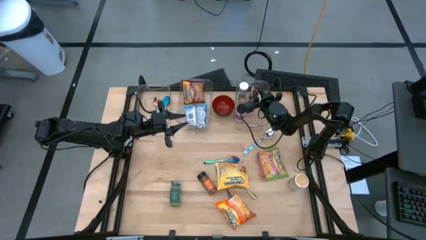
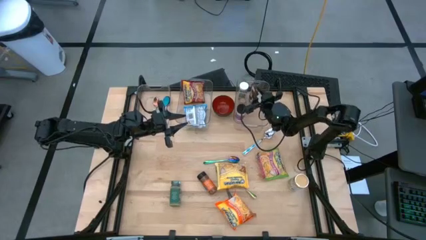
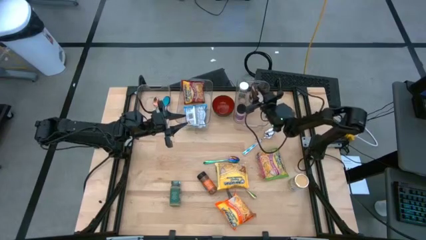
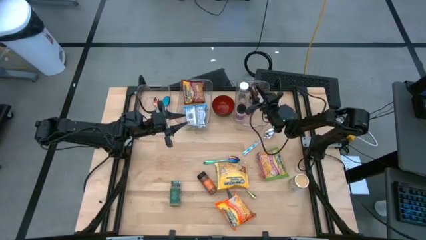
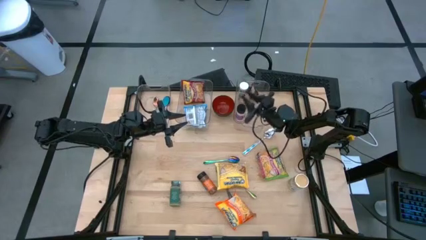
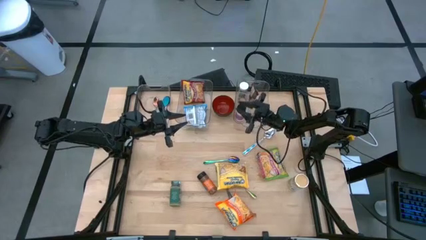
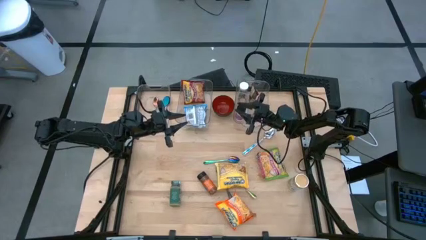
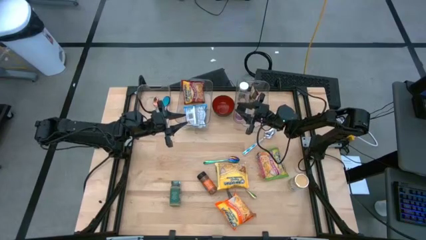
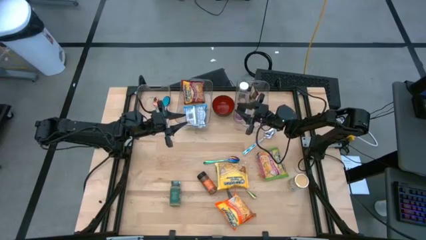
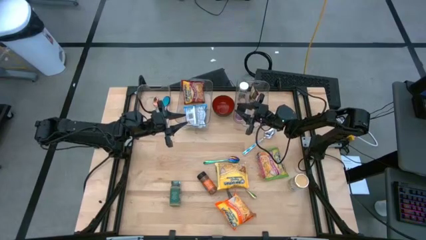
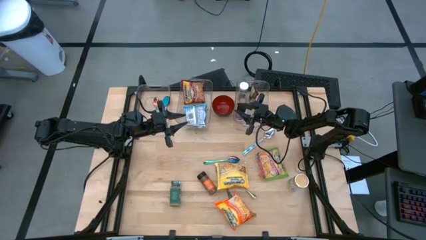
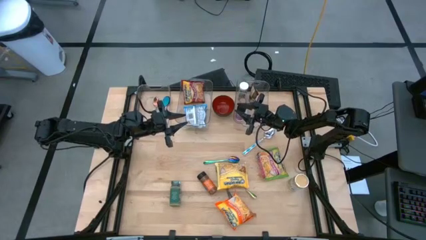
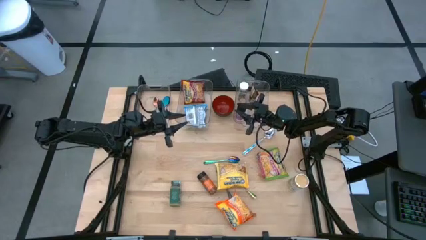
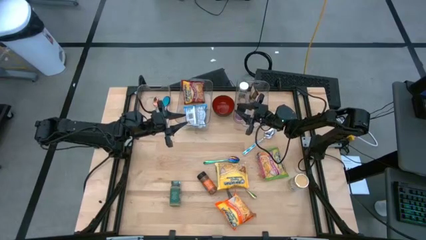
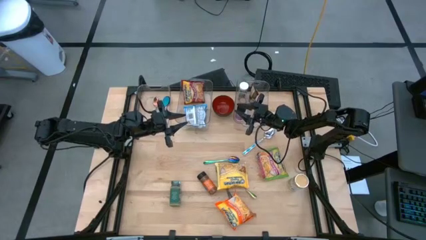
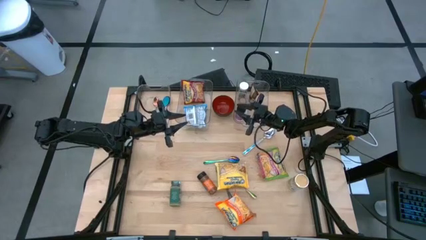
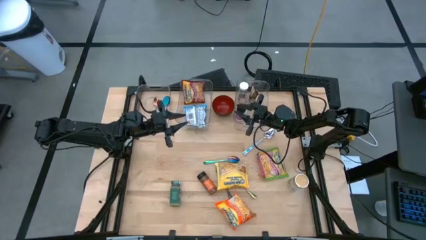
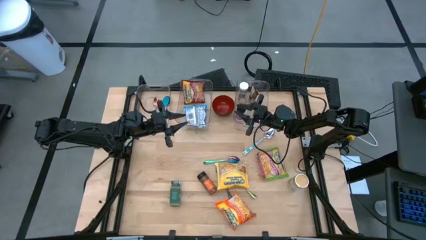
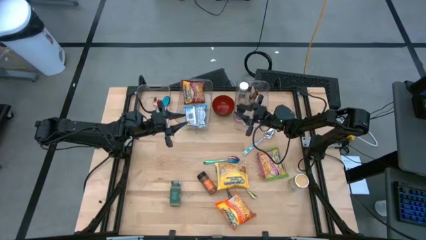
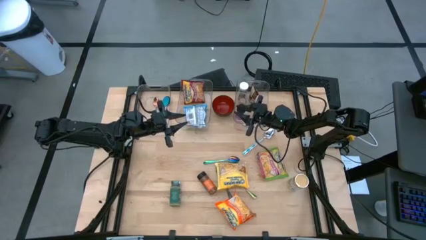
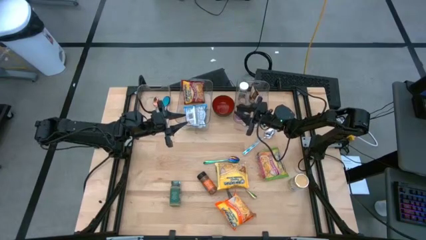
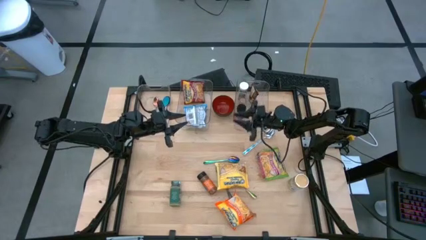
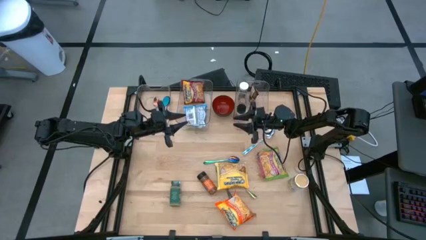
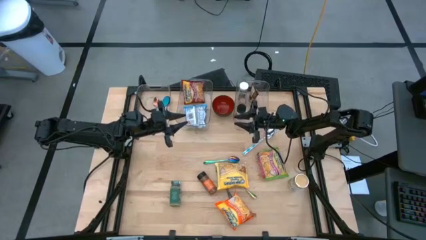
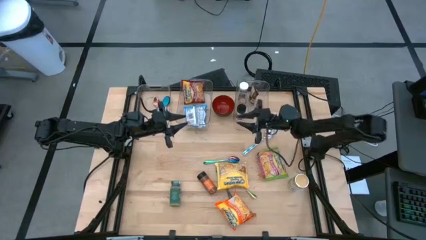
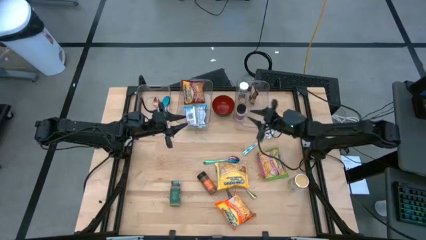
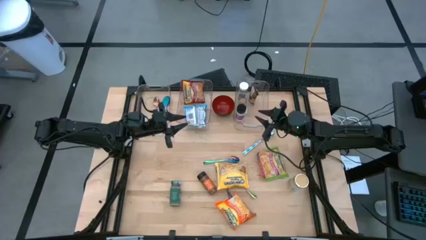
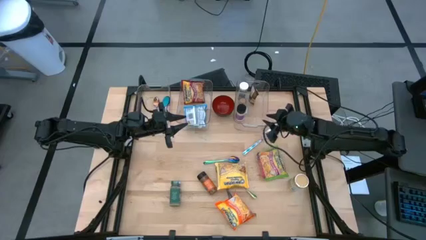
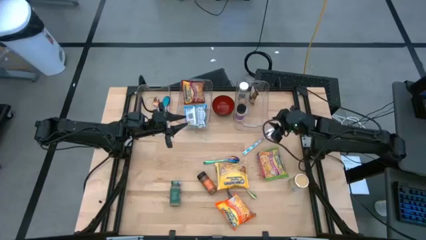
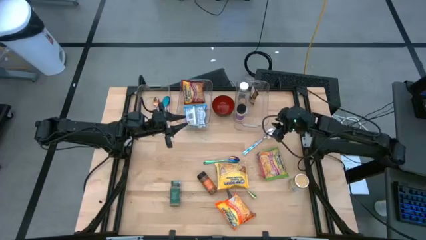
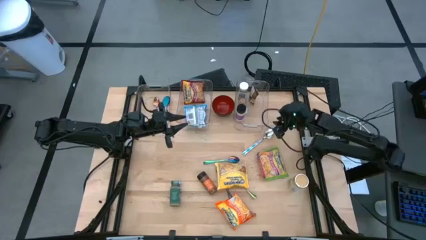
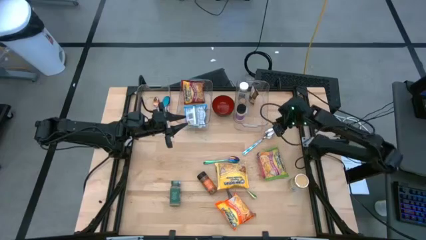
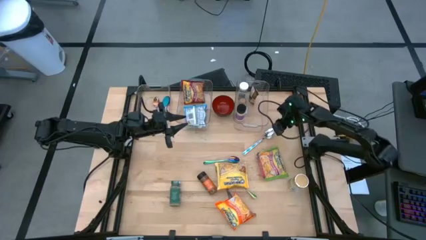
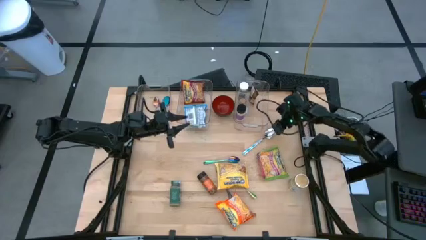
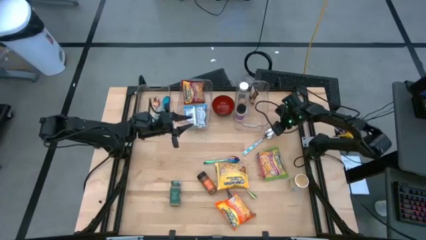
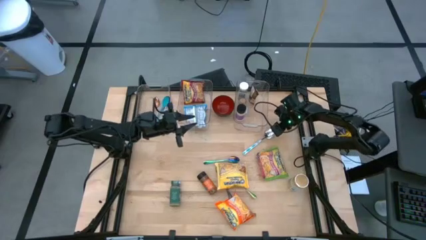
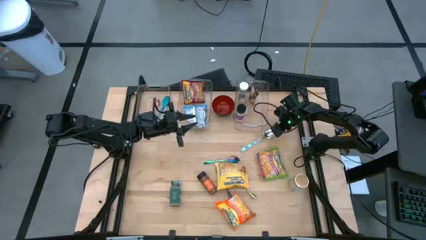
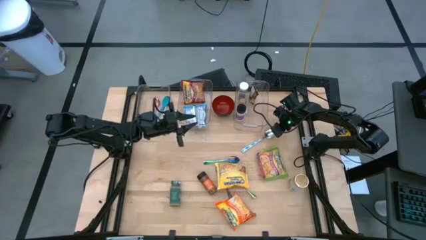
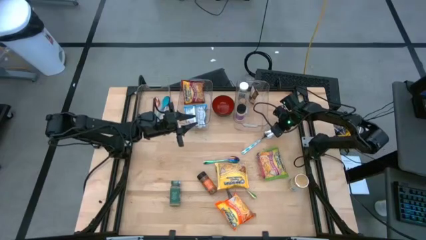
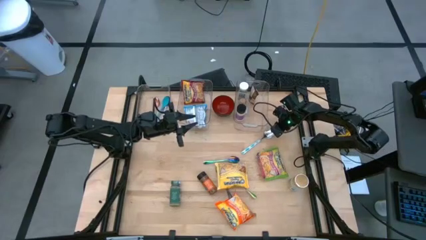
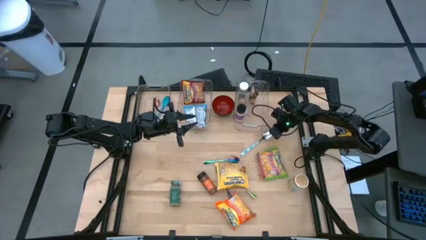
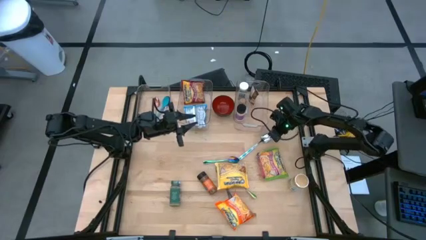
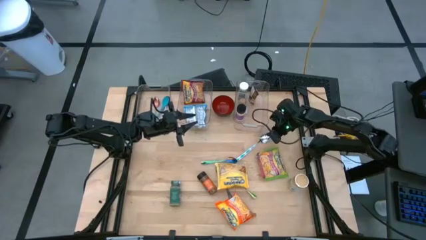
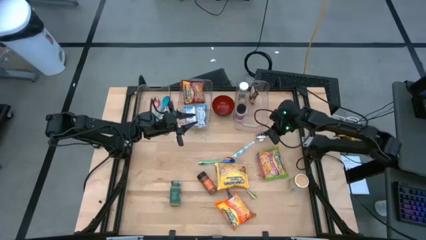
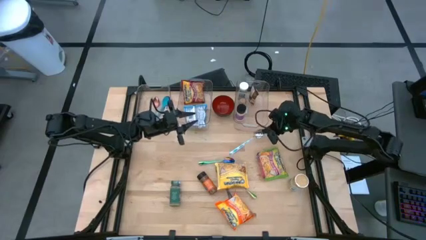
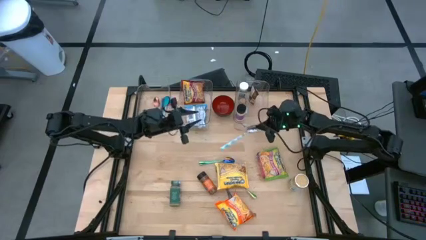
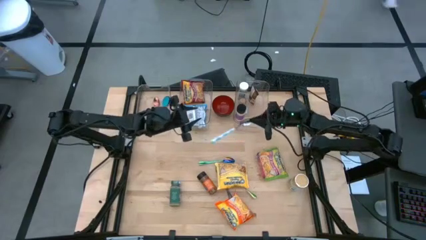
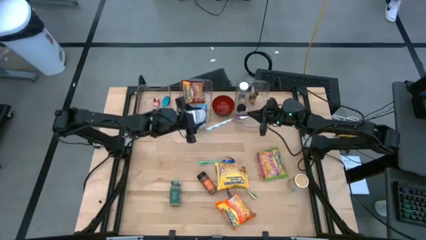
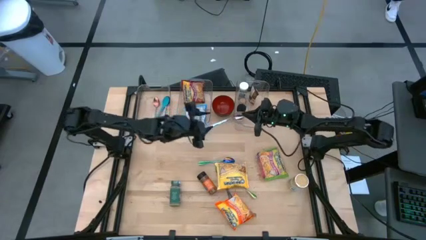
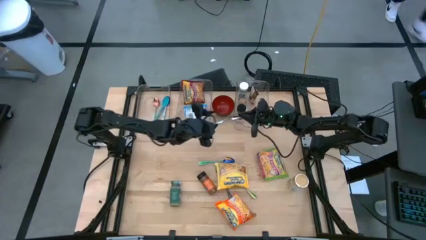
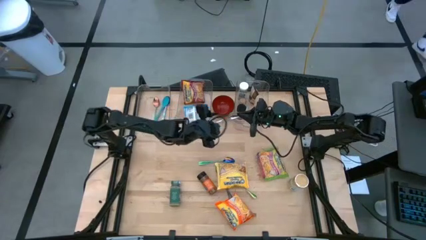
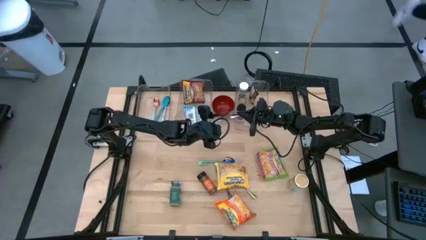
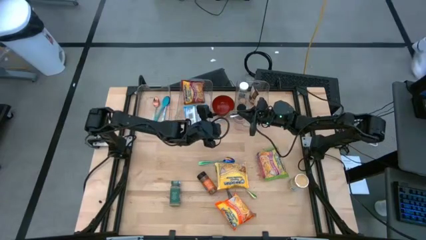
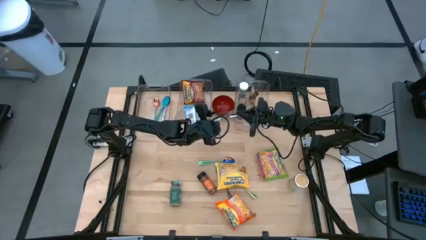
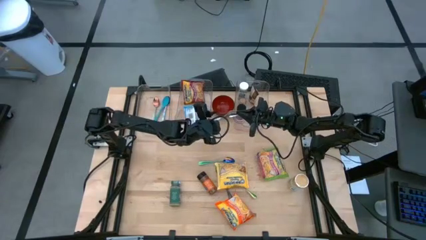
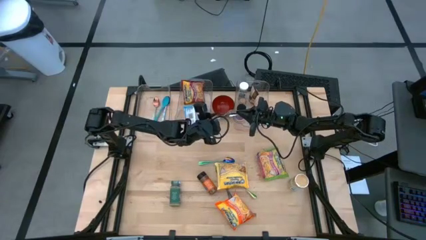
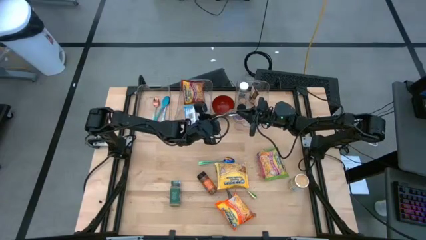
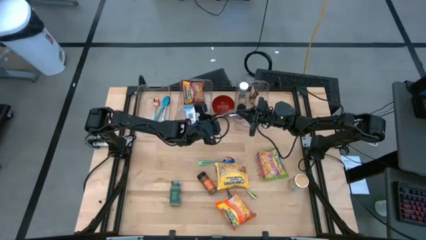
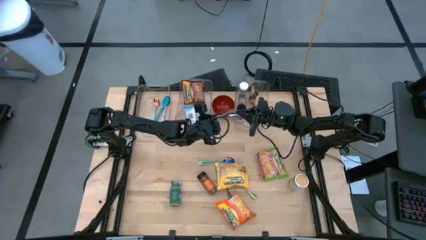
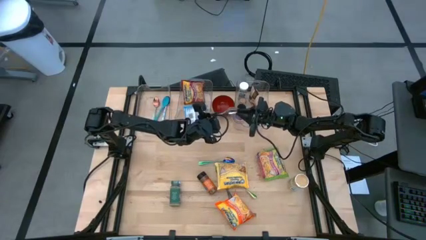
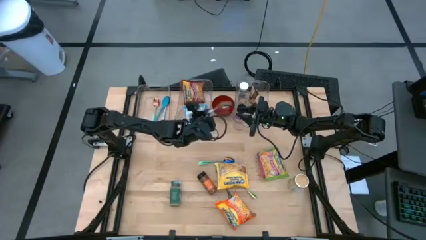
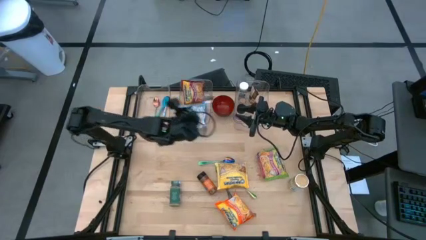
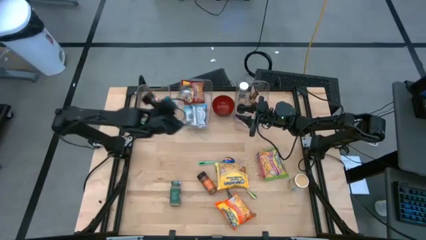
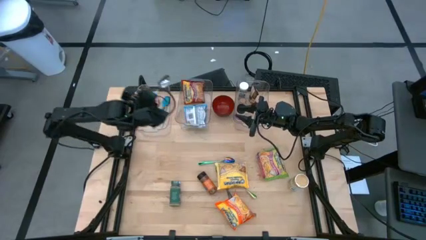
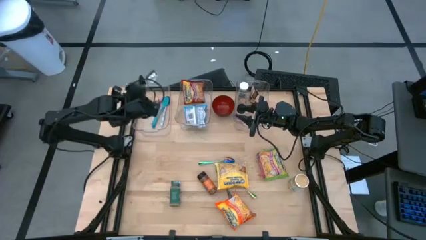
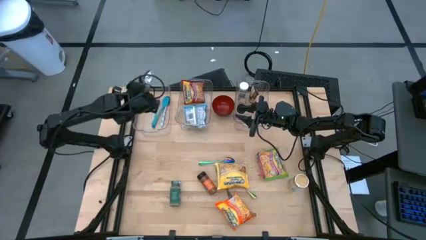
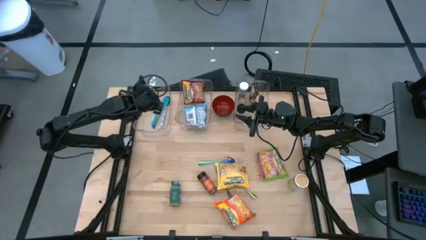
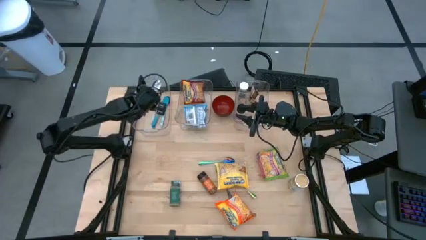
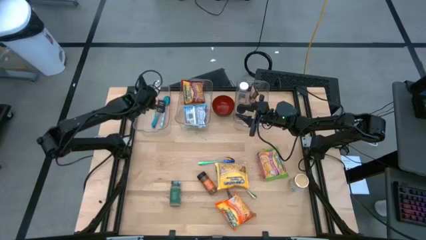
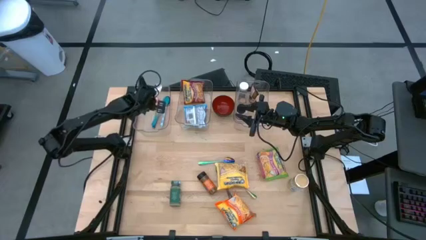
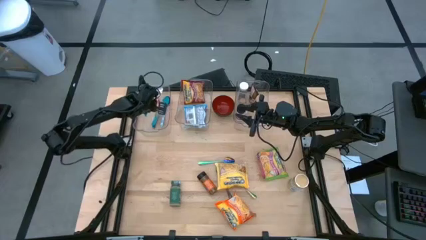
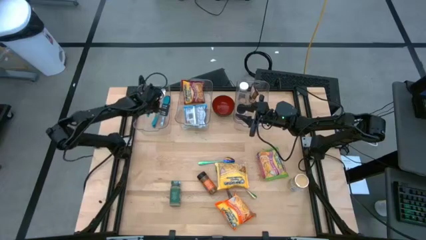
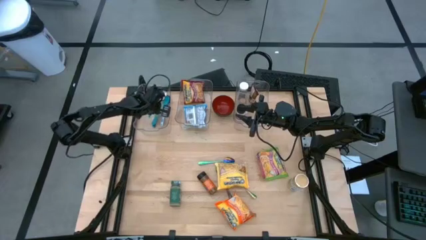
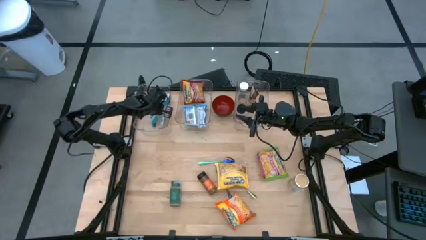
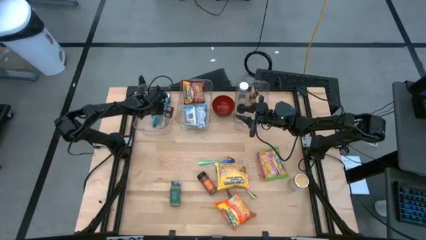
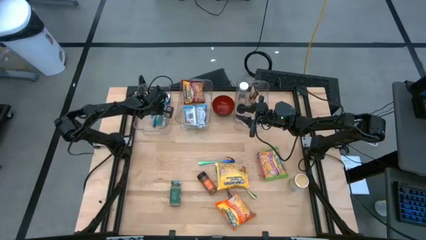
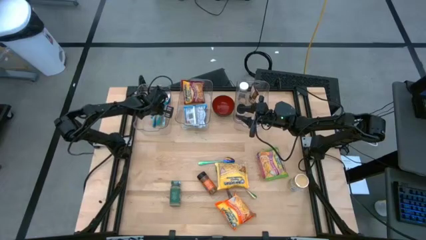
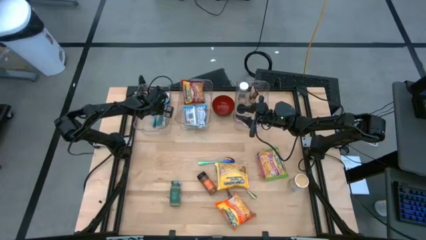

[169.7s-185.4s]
Task: Pick & Place Food Item
Put the white spoon into the left transparent bin
